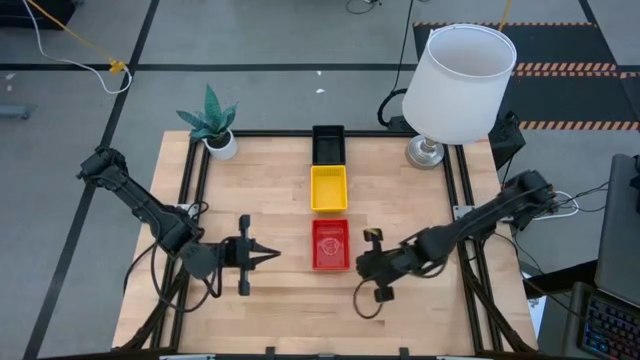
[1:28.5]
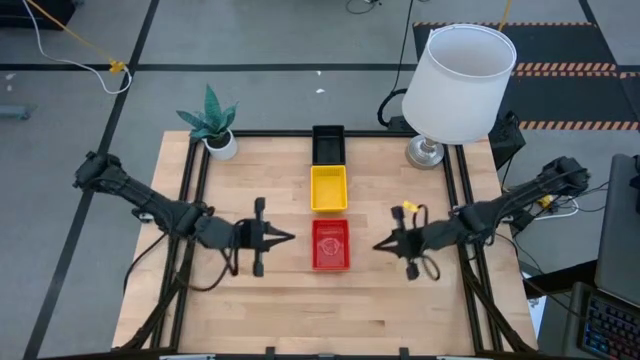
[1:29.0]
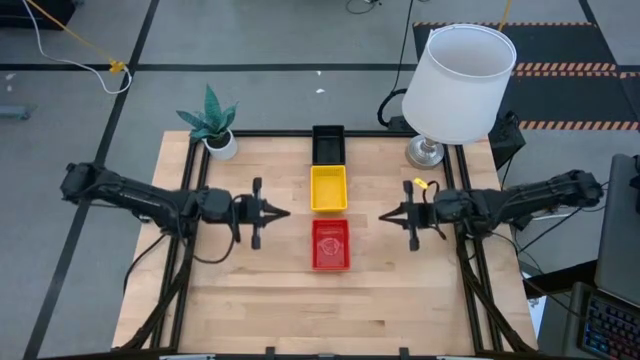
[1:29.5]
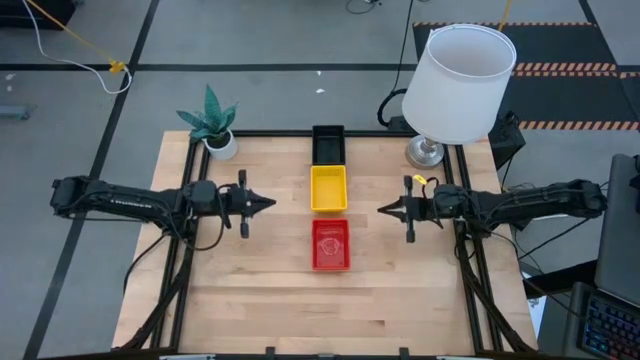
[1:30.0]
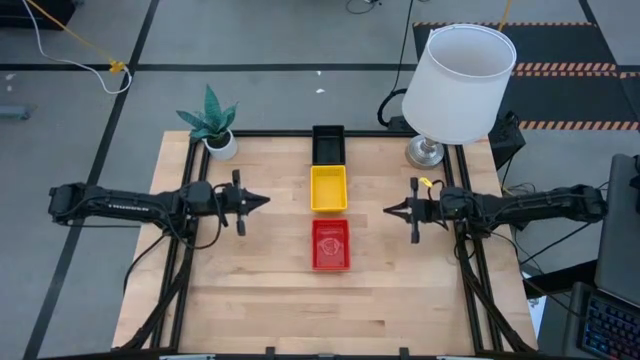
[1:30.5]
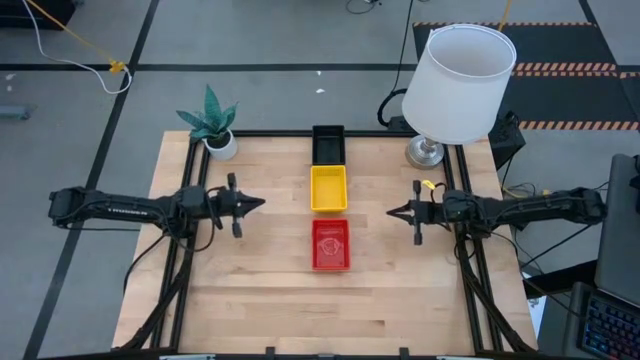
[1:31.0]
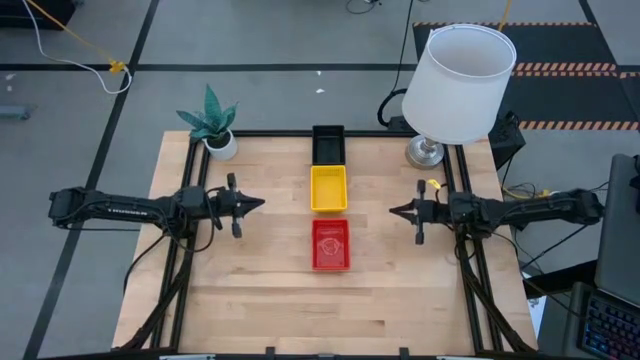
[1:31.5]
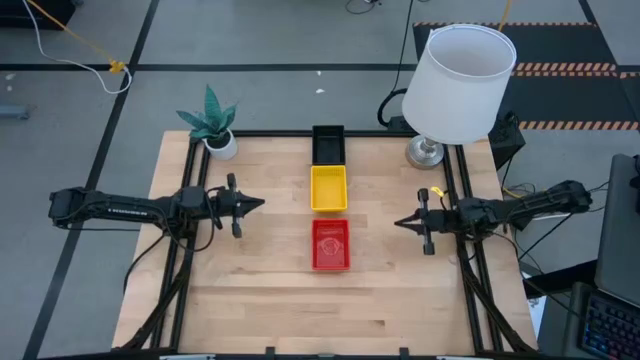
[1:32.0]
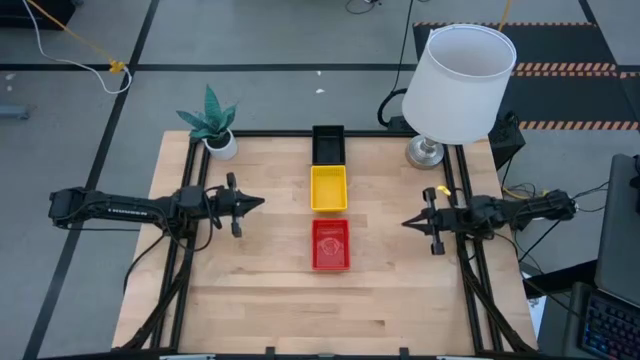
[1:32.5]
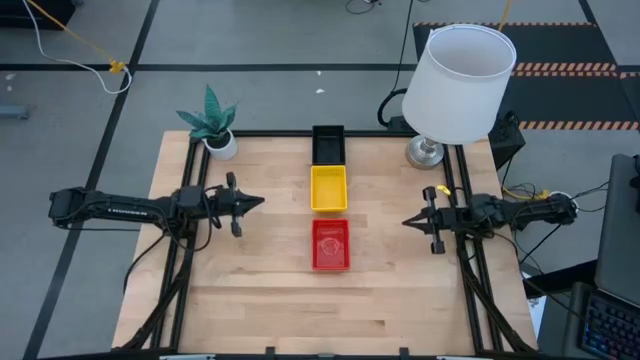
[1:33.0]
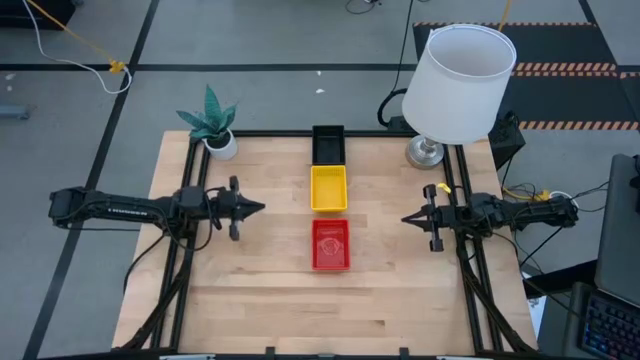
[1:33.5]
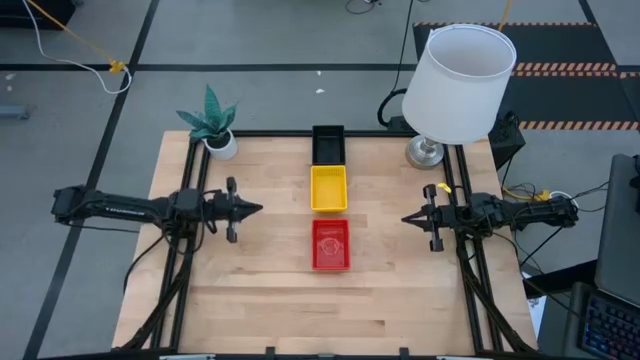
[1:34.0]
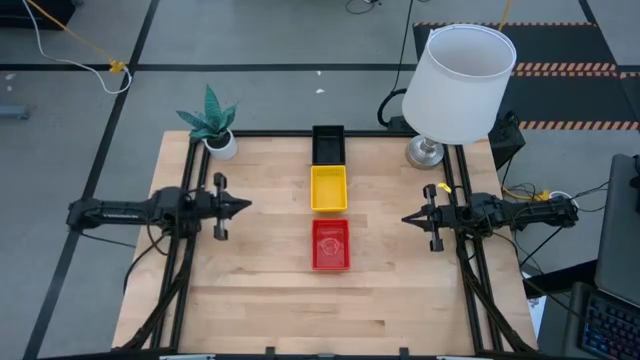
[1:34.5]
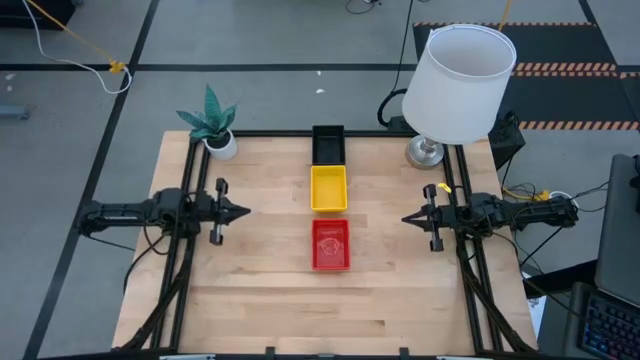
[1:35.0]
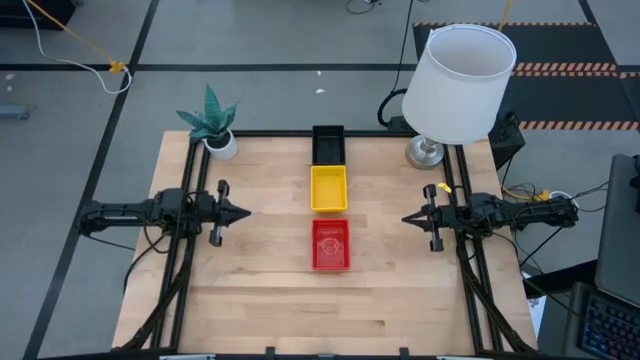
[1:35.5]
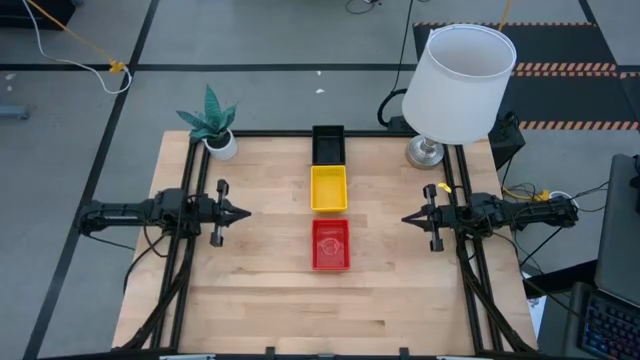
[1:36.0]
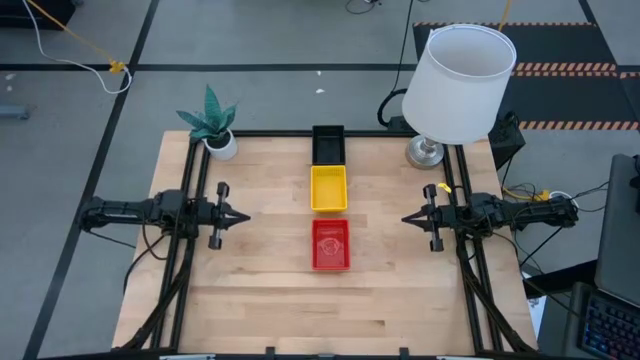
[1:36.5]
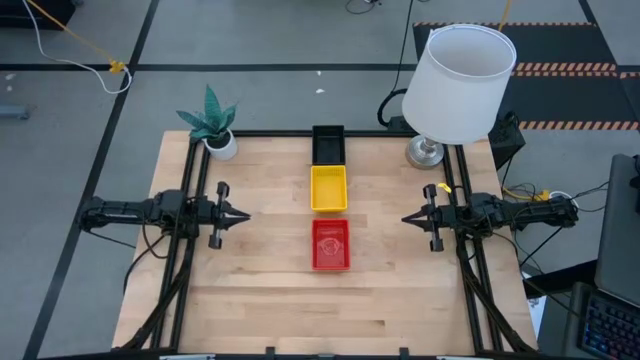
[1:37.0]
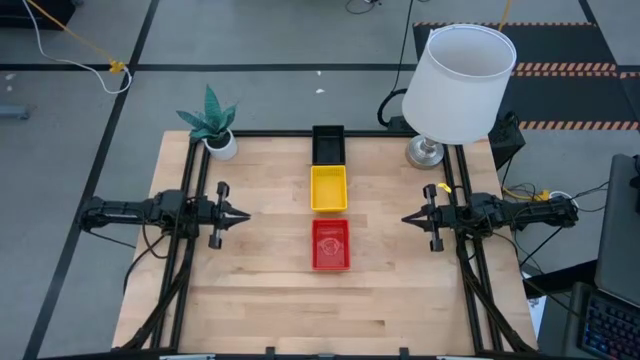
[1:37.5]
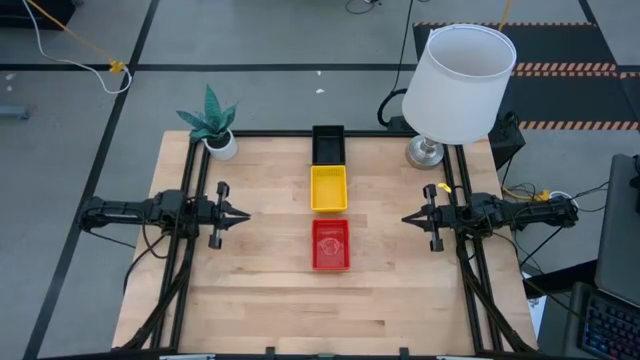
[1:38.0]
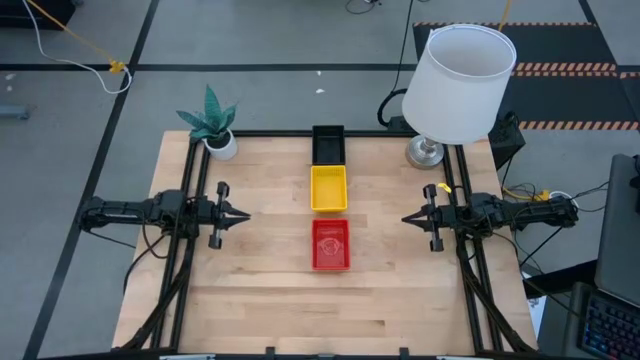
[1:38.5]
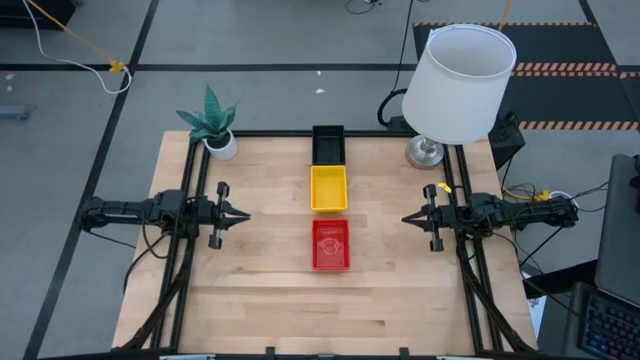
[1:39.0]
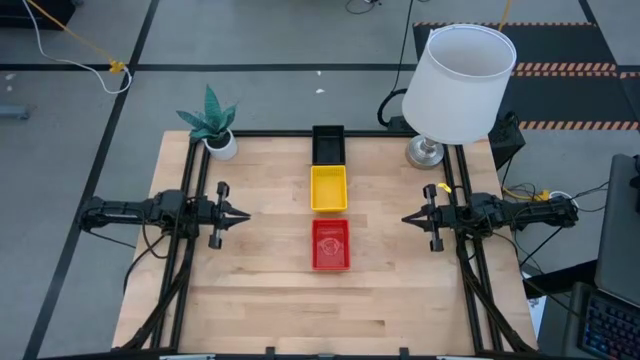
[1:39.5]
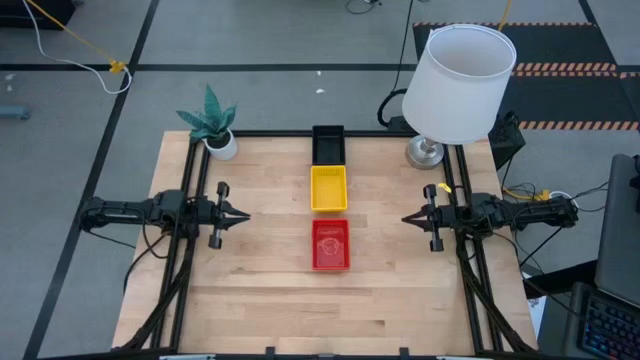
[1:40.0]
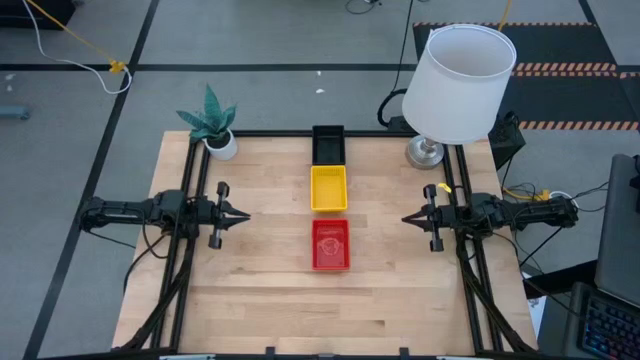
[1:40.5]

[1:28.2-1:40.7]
Return to Home Position
